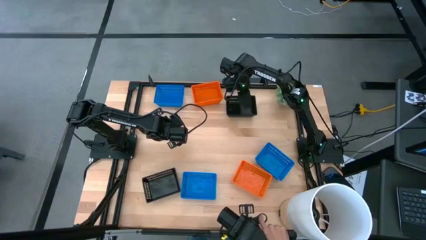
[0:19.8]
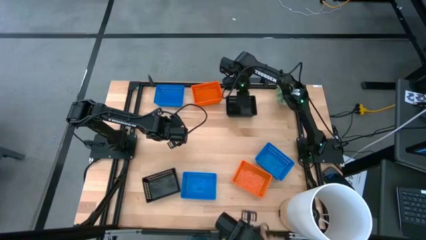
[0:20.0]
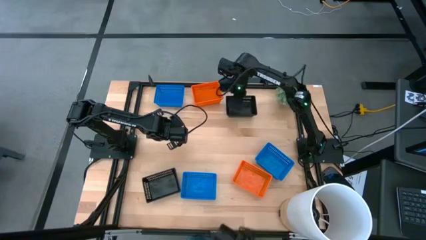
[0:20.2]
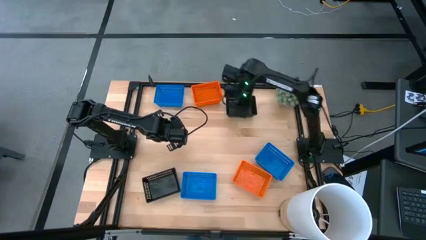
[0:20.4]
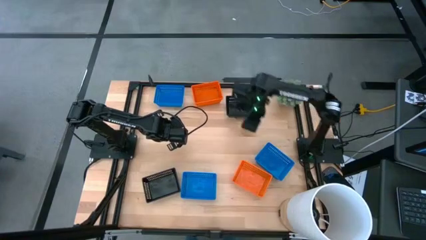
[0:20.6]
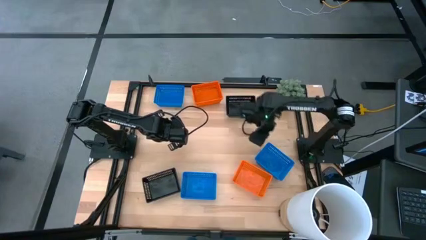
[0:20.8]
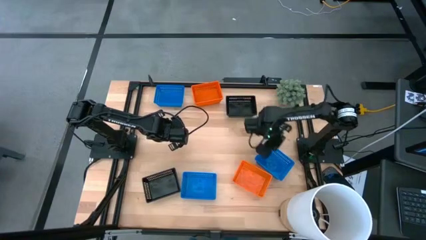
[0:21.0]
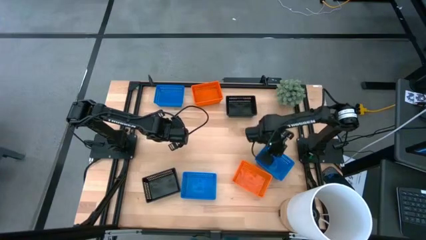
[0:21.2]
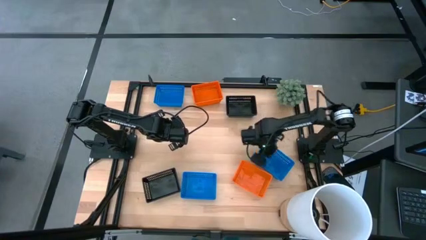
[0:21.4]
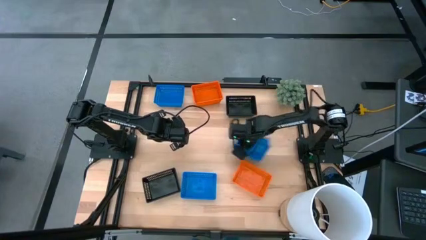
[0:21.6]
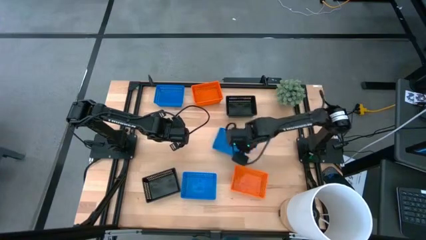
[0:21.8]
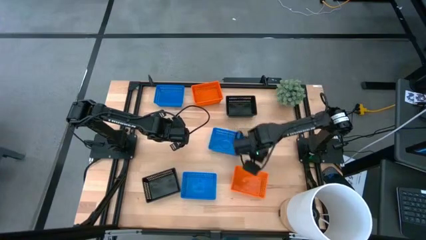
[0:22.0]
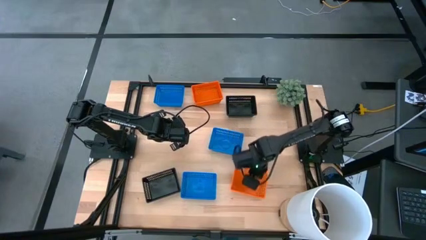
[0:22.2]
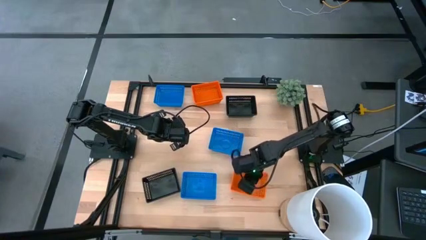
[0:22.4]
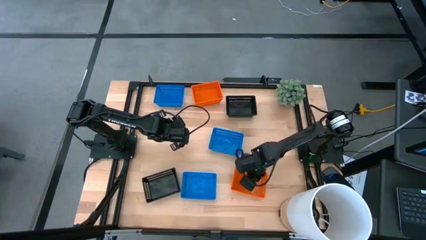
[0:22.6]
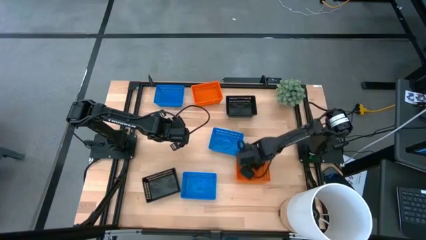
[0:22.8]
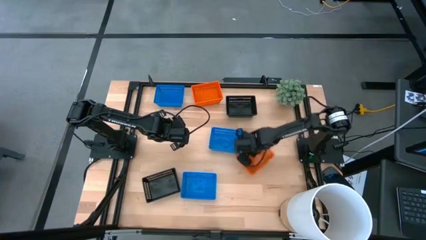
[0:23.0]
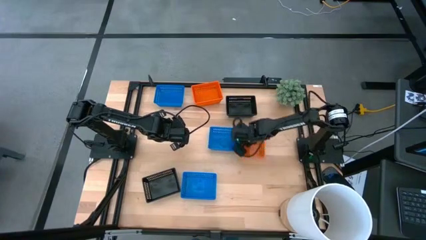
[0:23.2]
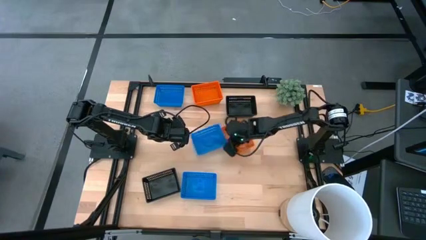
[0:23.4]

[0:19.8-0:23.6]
Move the bins to the center of the table

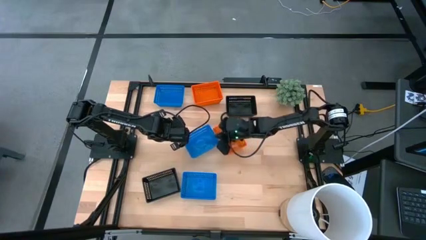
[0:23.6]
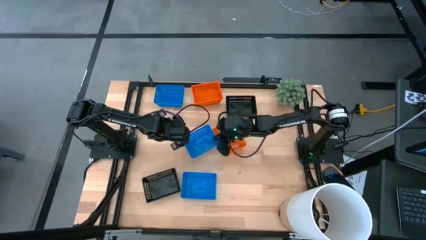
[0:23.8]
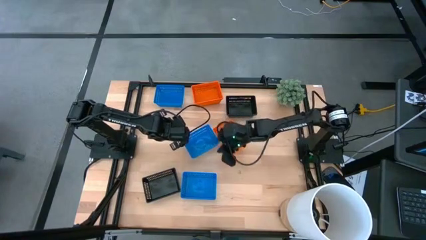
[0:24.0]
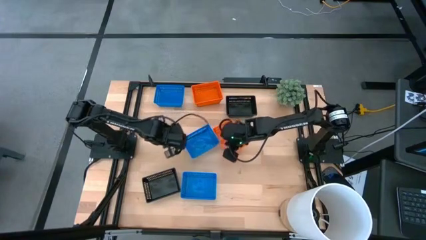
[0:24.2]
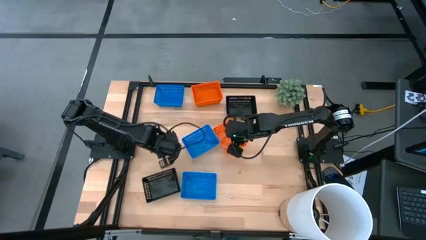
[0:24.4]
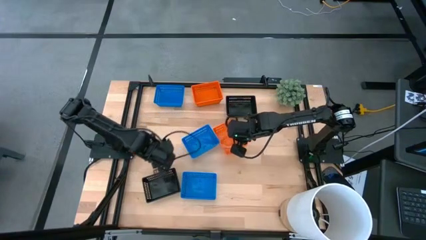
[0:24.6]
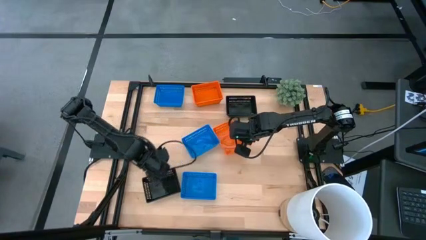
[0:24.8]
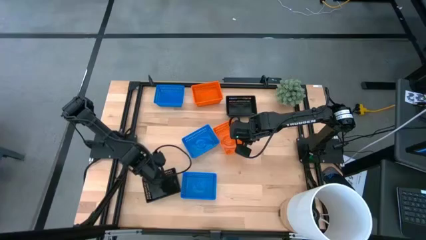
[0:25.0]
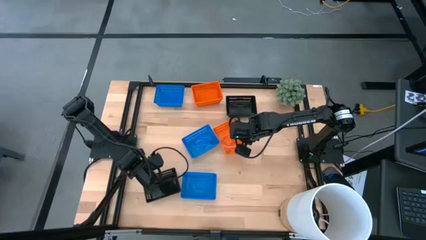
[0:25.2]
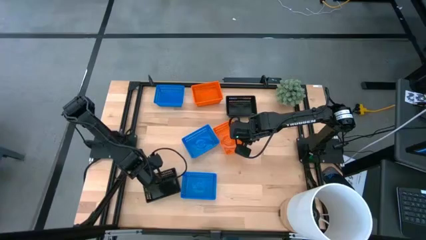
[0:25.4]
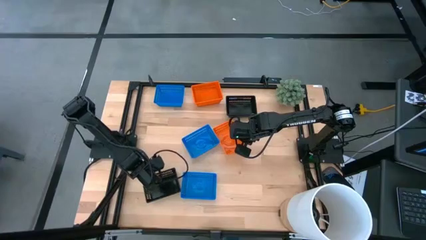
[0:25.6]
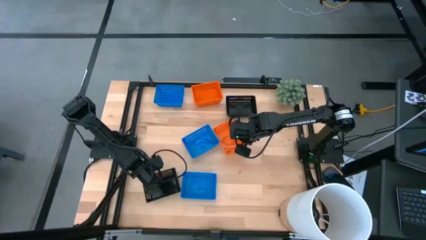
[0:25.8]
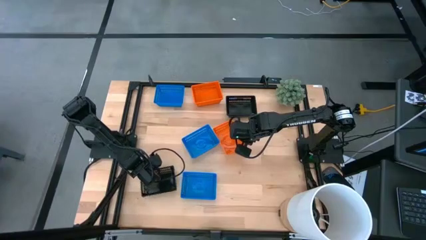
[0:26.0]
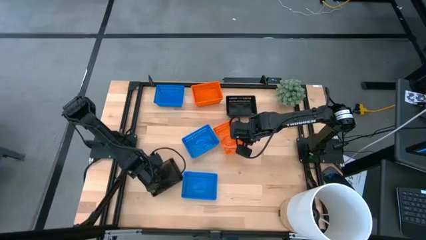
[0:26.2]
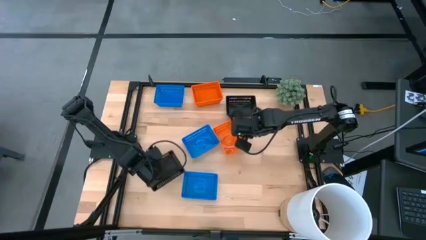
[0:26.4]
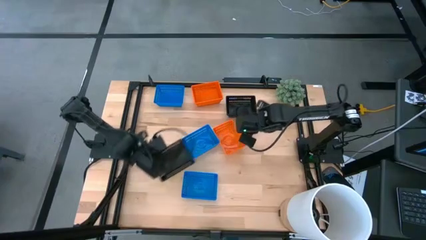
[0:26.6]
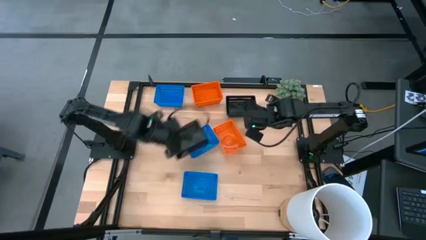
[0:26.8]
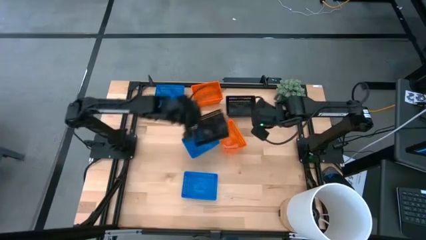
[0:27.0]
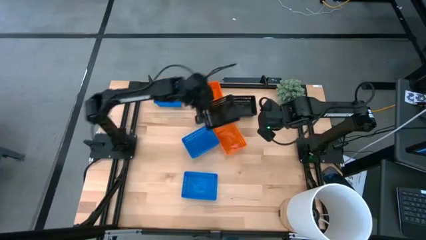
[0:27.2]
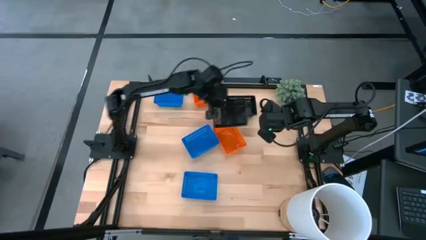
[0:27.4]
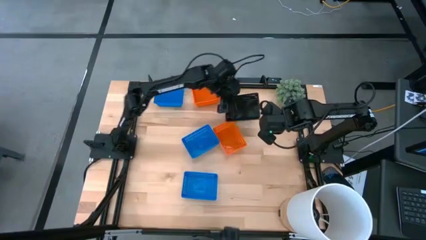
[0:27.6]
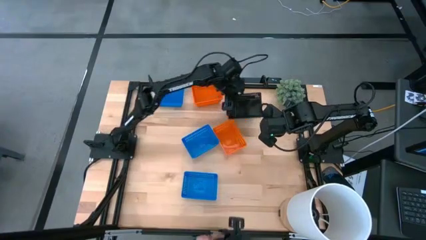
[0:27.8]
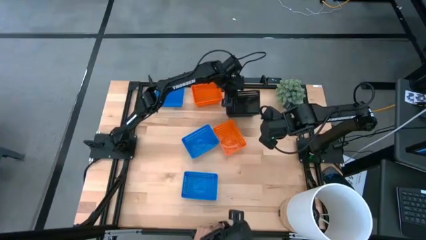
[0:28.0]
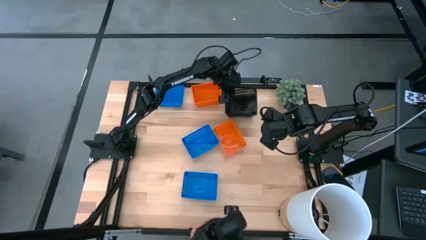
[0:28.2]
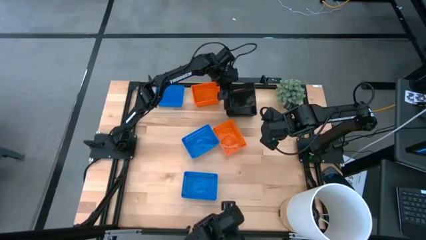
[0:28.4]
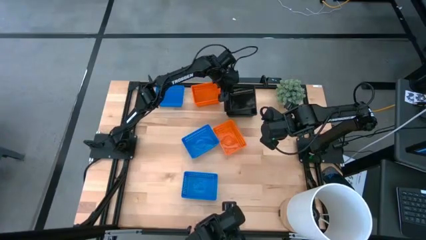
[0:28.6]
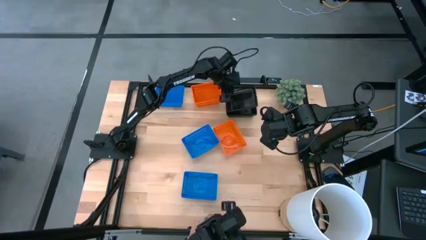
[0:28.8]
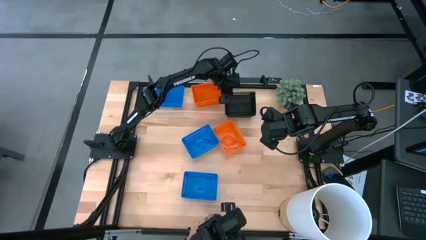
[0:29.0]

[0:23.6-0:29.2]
Stack the bottom black bin on the black bin

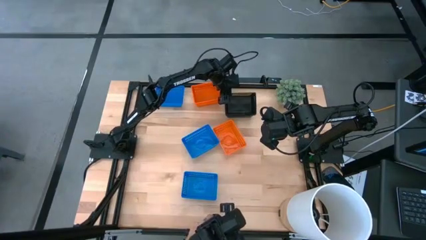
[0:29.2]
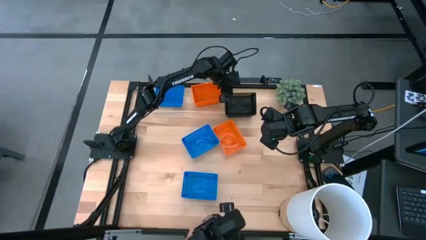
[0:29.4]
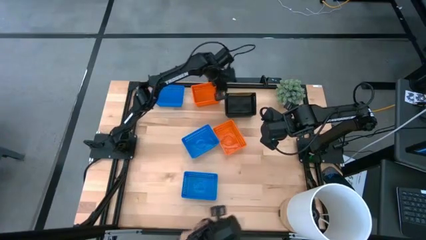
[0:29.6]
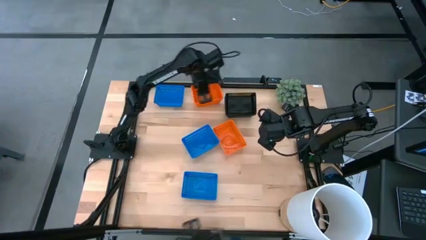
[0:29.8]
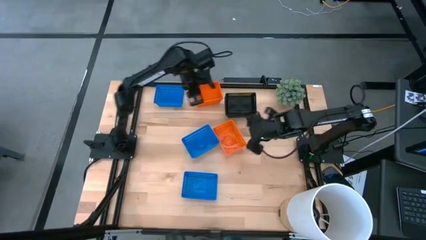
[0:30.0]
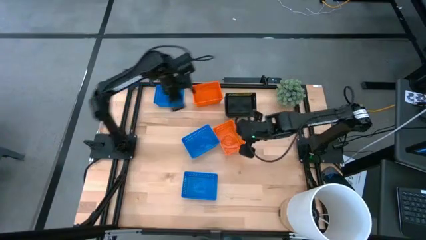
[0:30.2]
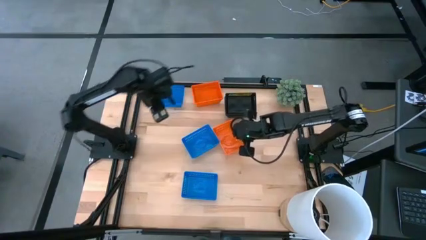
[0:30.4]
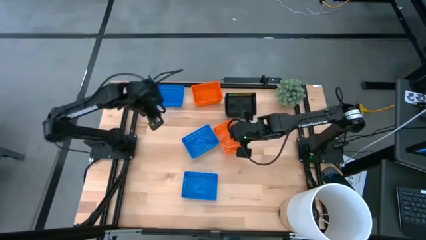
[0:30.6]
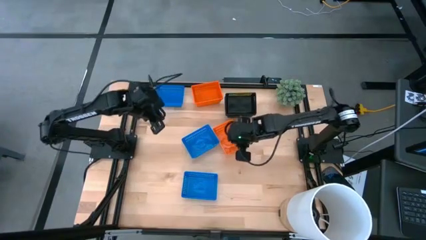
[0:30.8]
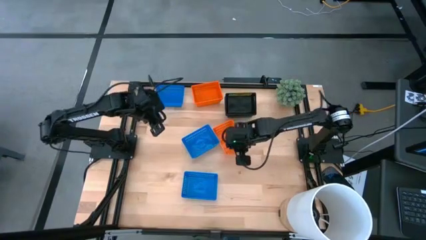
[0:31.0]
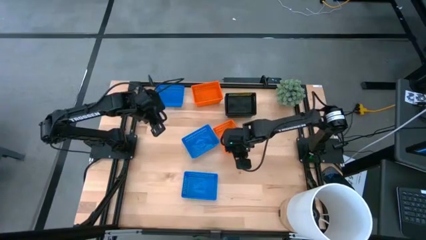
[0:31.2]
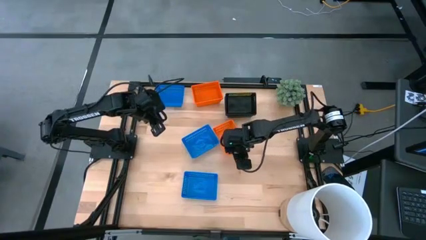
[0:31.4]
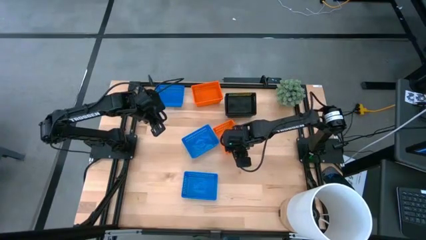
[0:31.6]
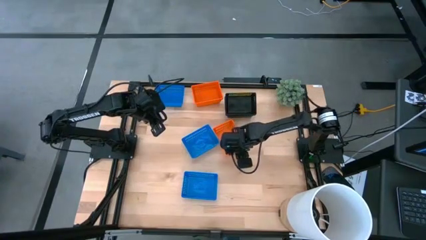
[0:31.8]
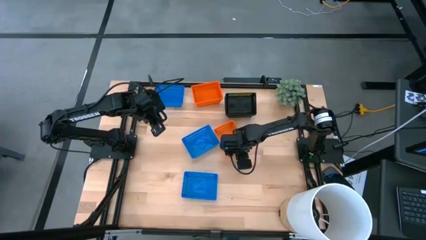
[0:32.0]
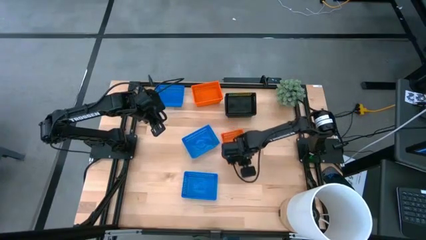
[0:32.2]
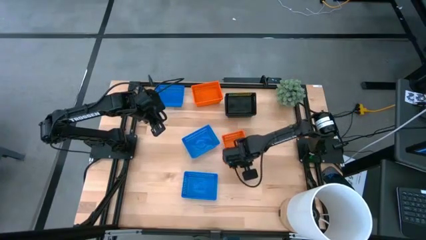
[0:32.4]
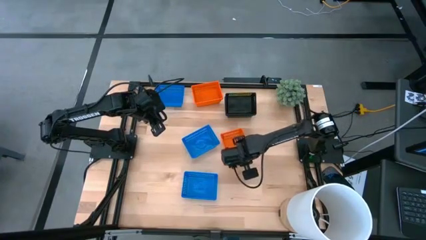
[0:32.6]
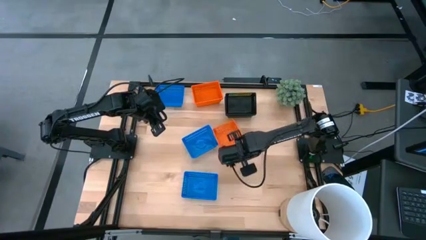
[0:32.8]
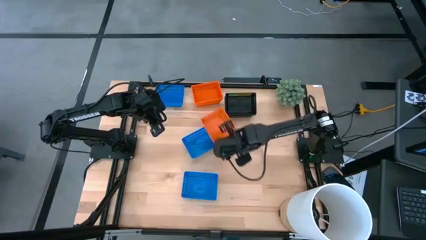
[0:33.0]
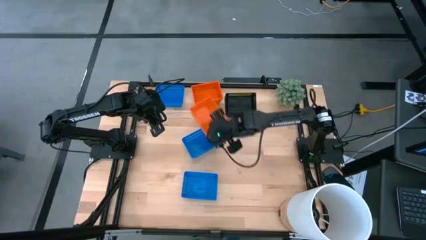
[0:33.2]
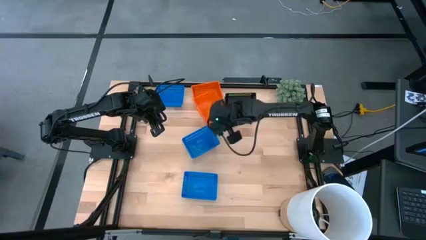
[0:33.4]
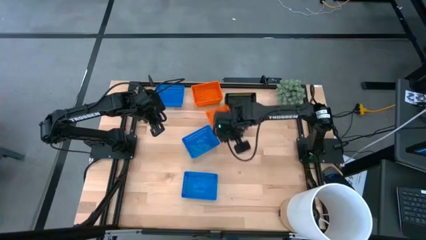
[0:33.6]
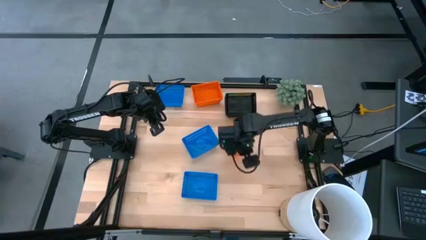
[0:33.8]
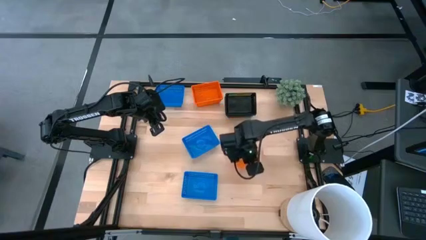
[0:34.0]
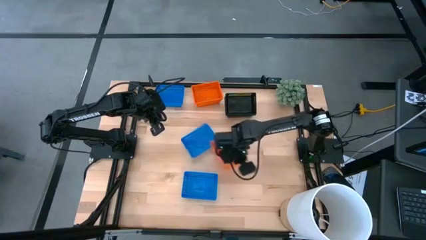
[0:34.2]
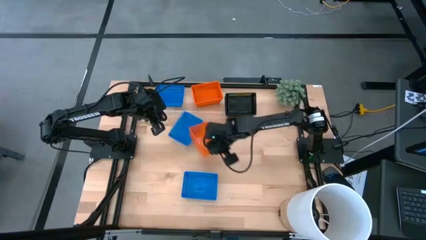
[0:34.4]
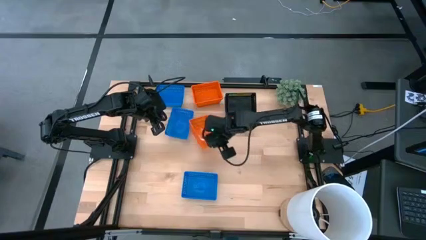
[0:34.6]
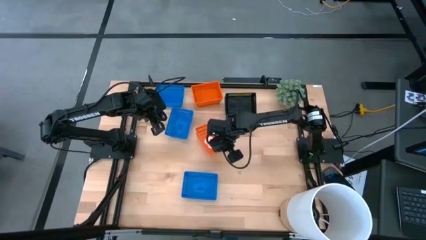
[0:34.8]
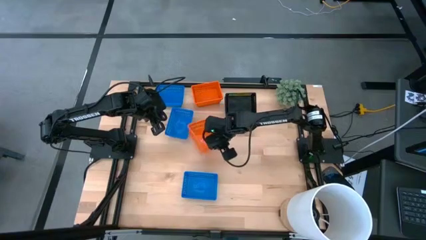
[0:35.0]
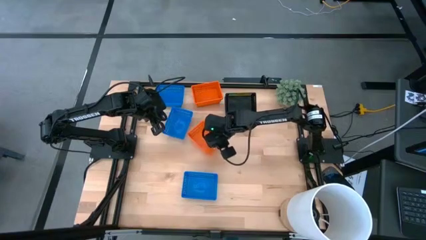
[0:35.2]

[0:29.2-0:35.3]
Stack the bottom orange bin on the orange bin

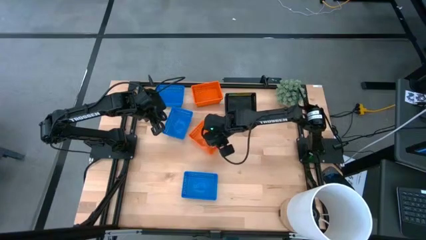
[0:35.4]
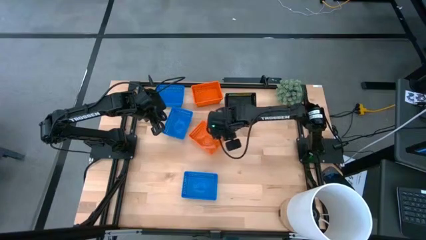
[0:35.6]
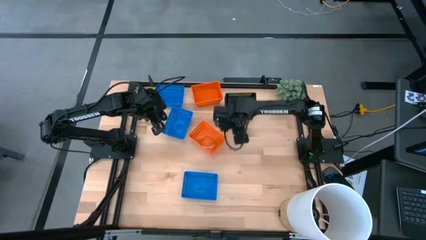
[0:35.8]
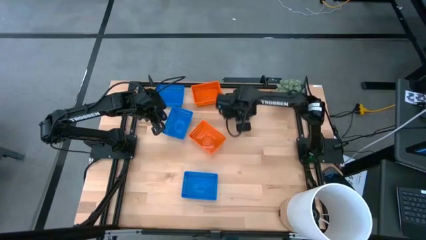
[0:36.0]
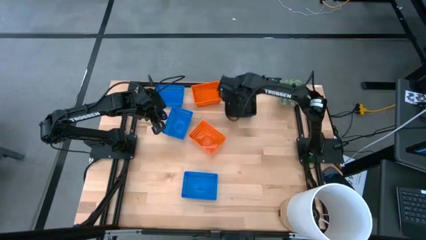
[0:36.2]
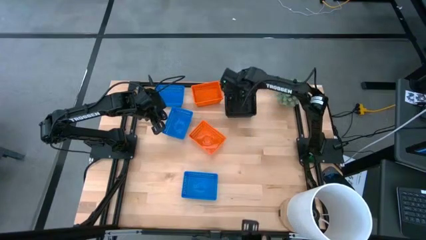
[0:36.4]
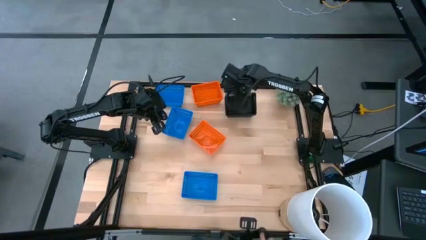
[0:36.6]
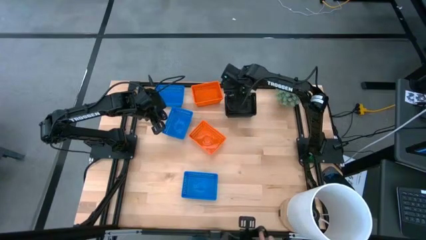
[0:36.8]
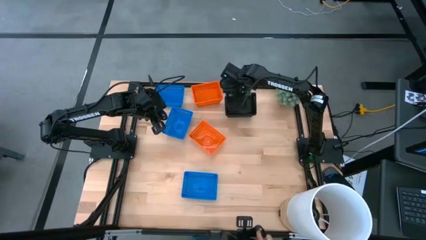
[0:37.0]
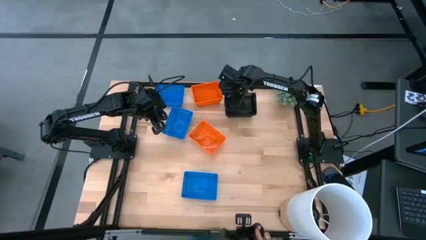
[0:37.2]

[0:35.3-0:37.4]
Adjust the stack of black bins
